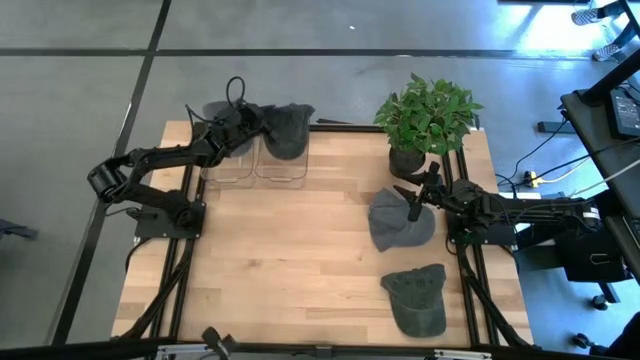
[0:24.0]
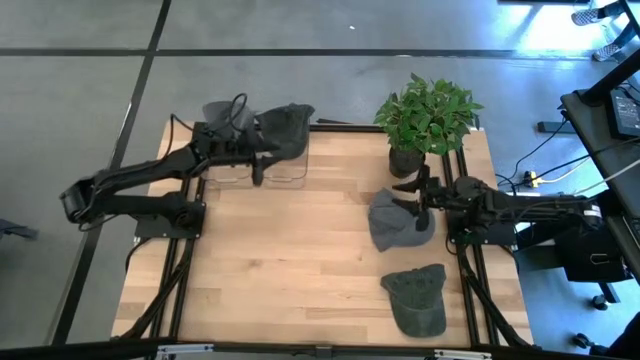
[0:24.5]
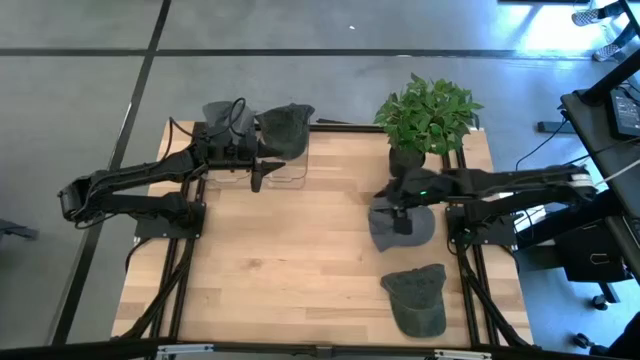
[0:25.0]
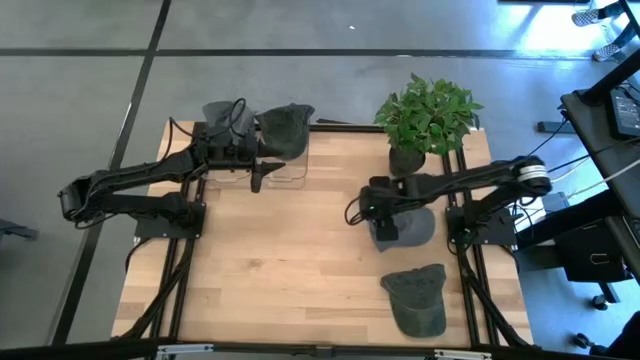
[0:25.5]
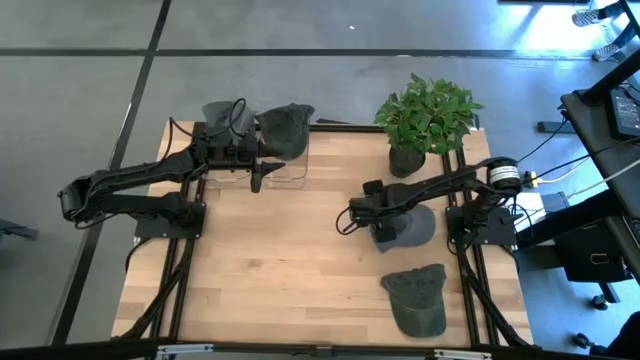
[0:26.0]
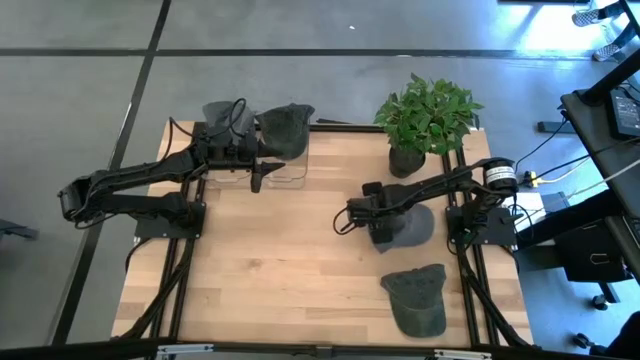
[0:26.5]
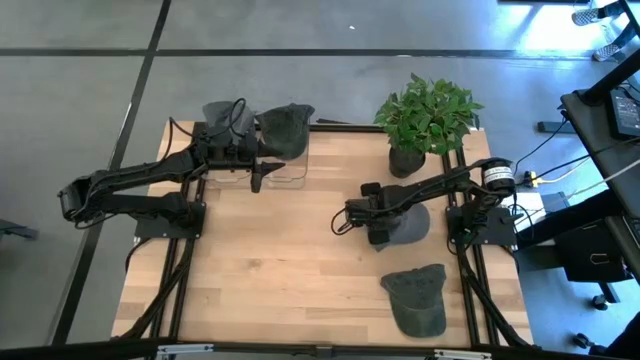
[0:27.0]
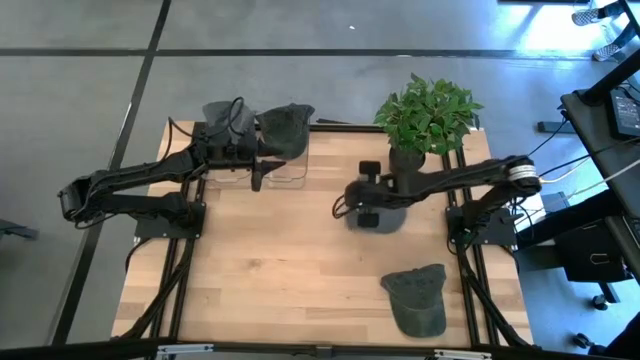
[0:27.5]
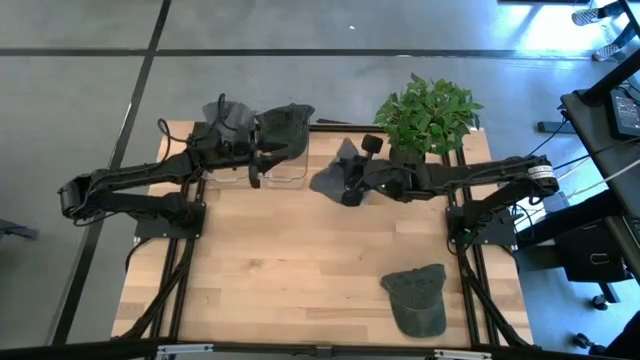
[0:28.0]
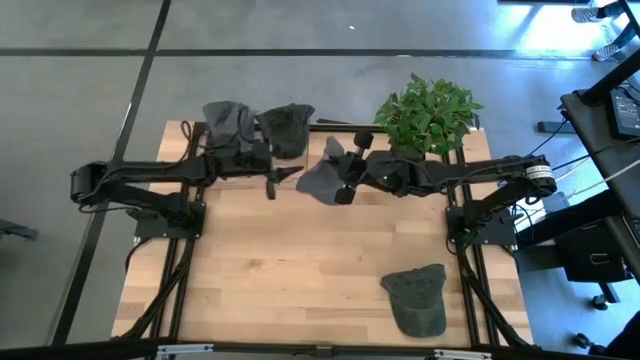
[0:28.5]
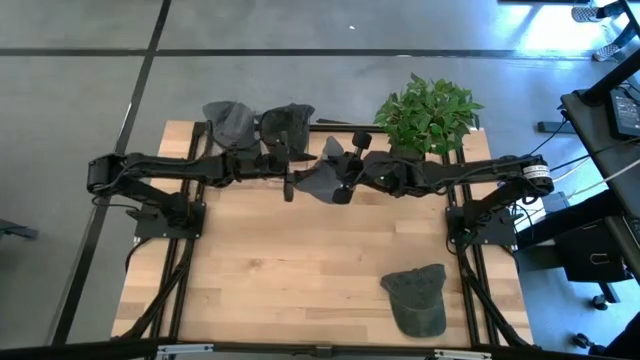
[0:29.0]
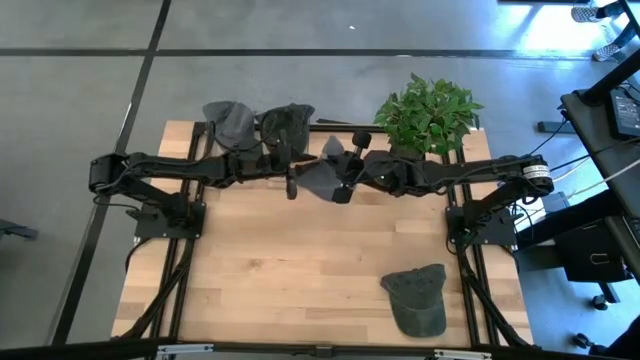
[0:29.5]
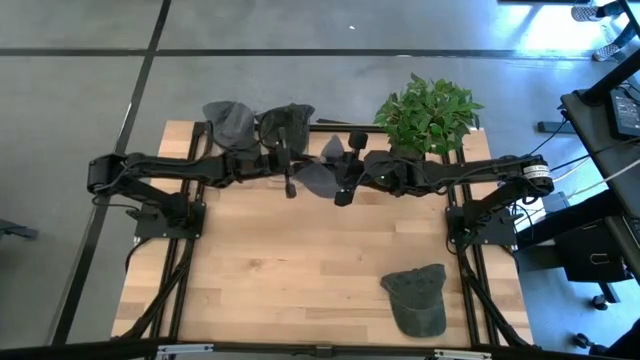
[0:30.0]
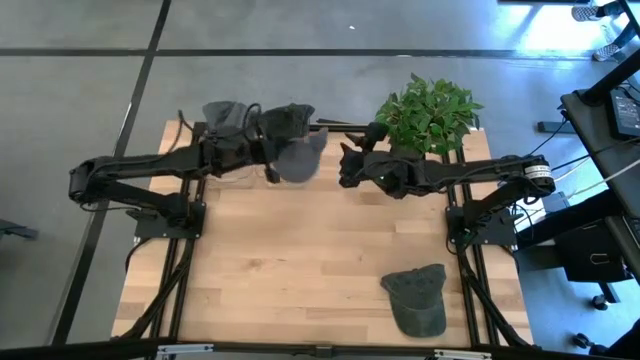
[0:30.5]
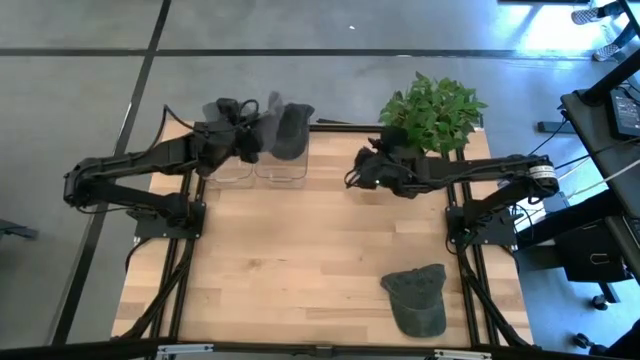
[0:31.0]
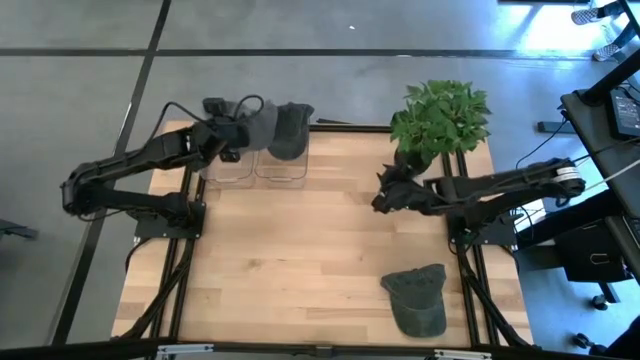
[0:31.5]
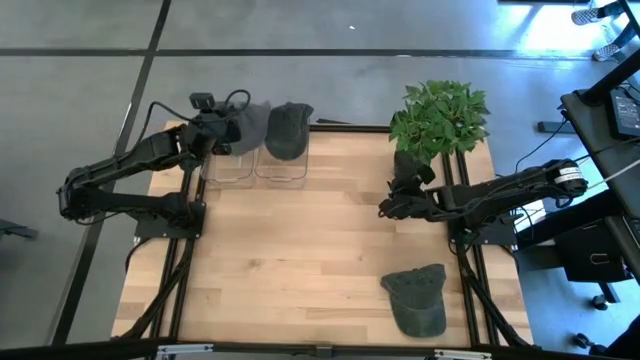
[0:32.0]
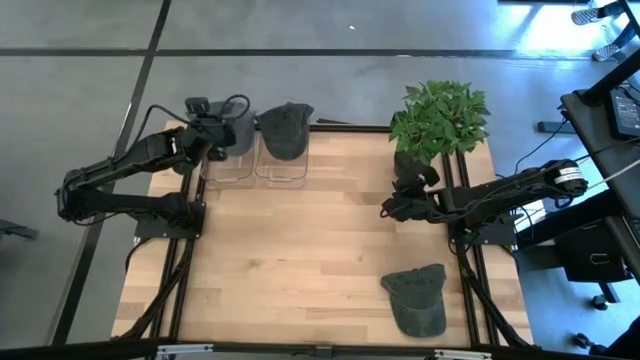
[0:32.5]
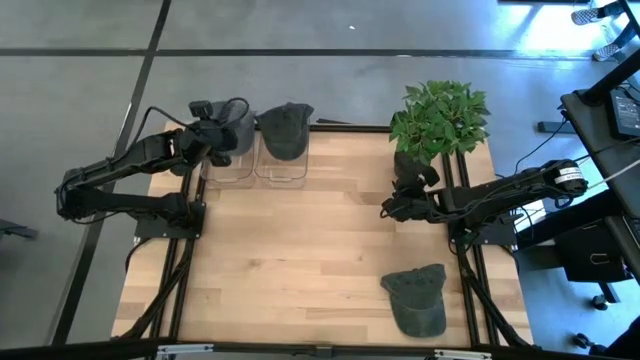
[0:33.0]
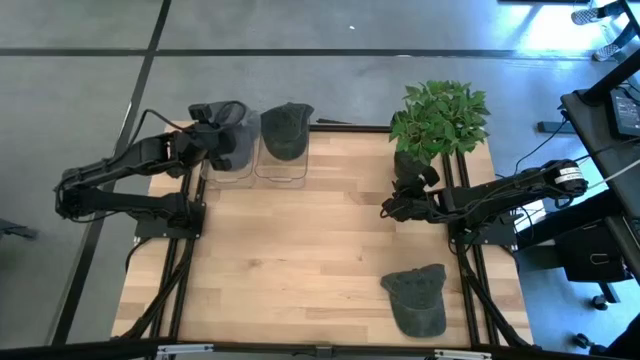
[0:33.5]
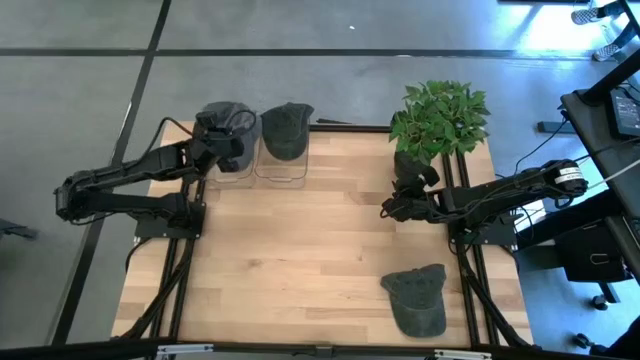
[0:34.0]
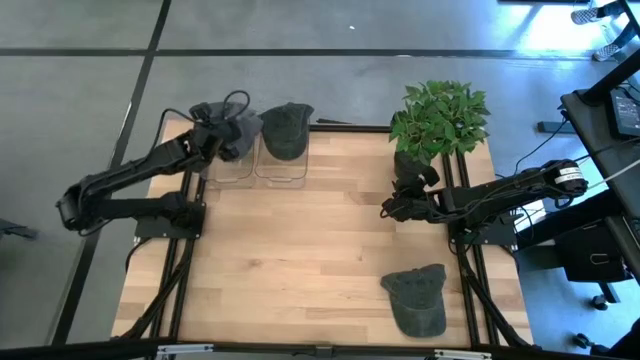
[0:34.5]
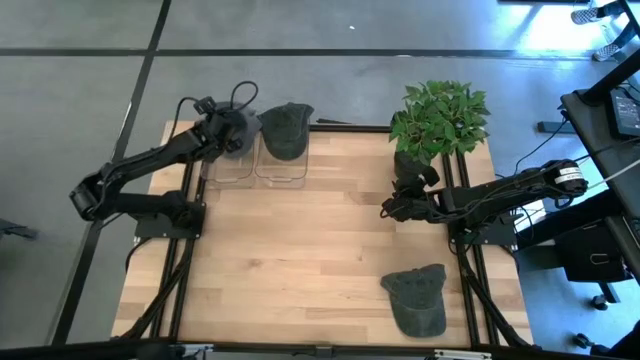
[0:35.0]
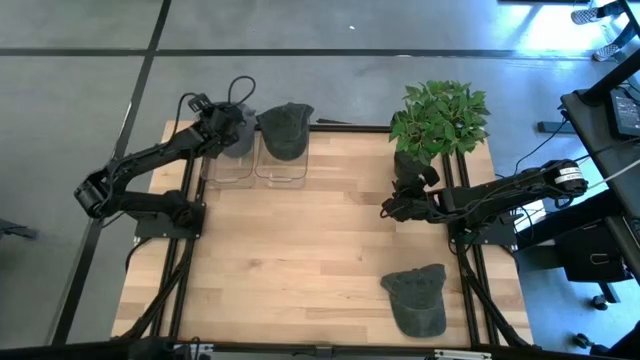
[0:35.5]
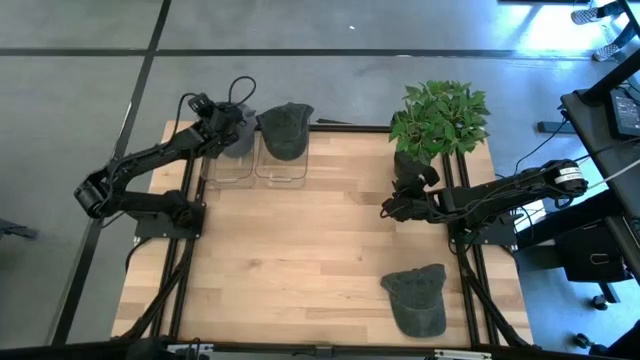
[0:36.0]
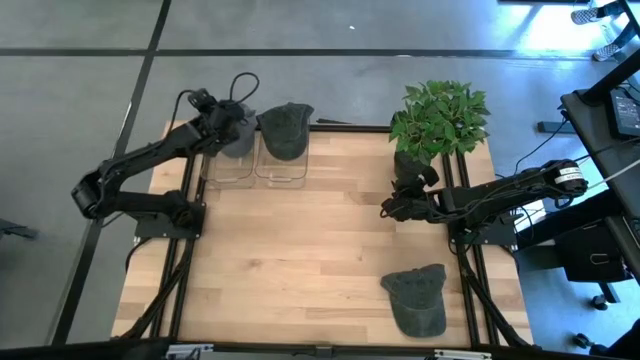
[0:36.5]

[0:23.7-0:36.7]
Task: Pick & Place hat
Put the gray cap into the left transparent bin
